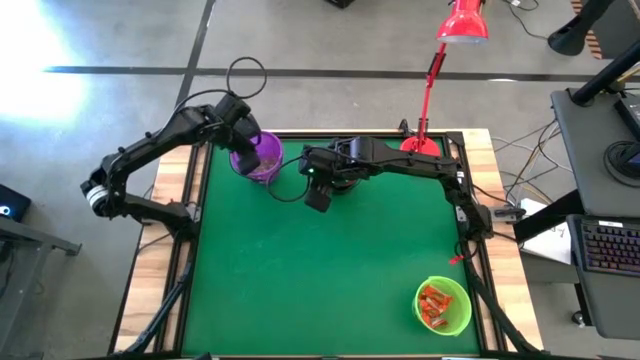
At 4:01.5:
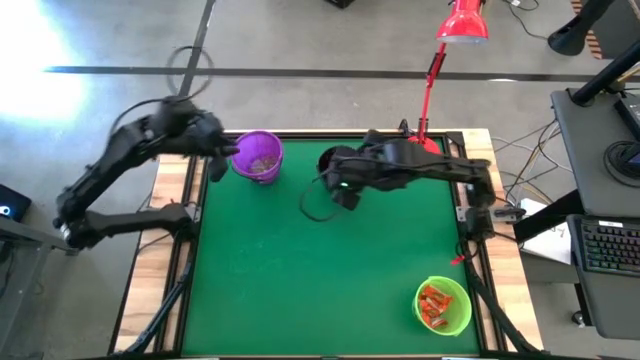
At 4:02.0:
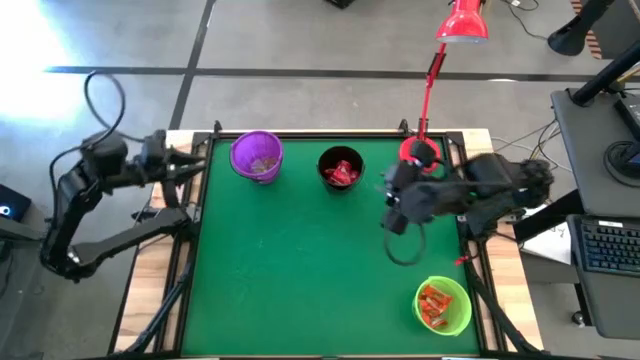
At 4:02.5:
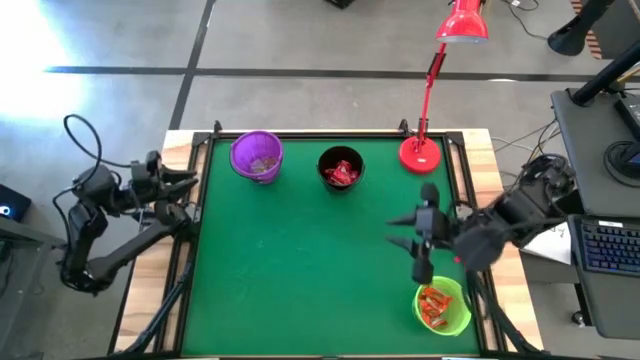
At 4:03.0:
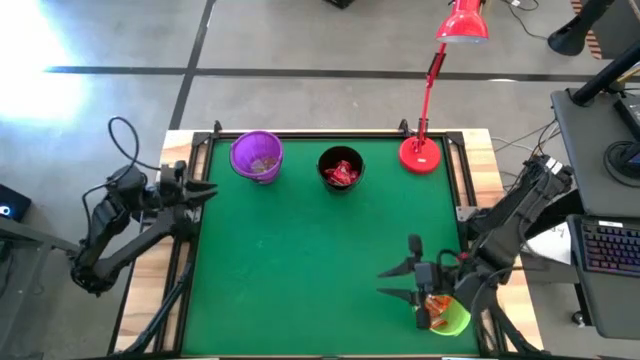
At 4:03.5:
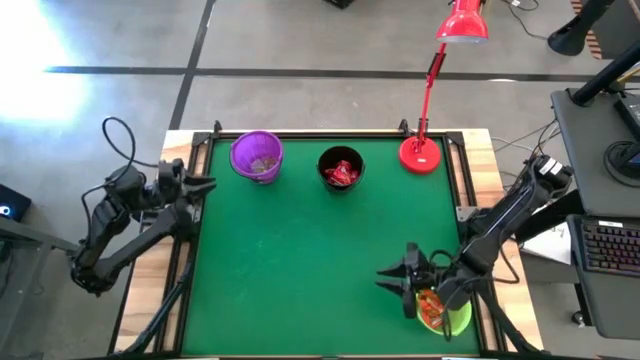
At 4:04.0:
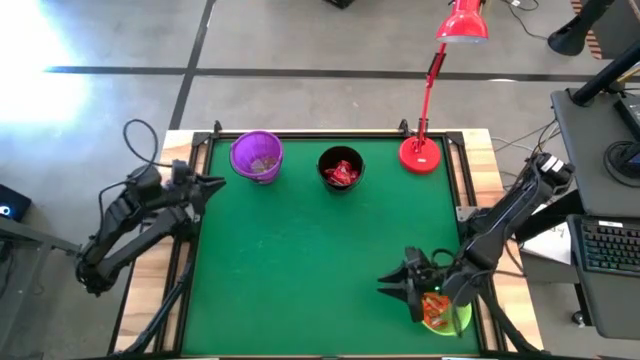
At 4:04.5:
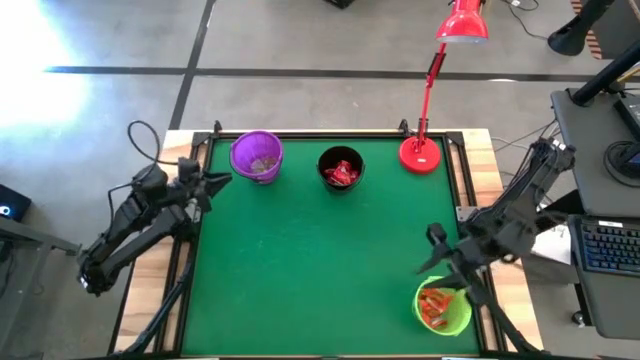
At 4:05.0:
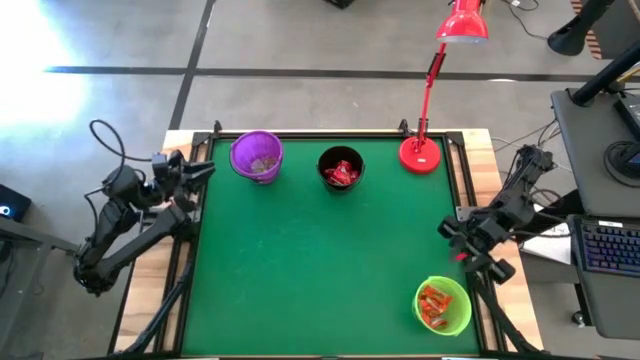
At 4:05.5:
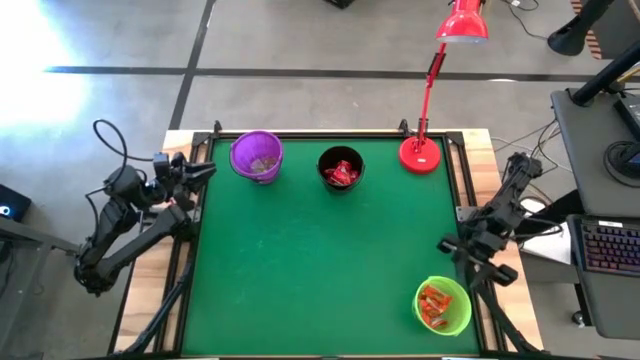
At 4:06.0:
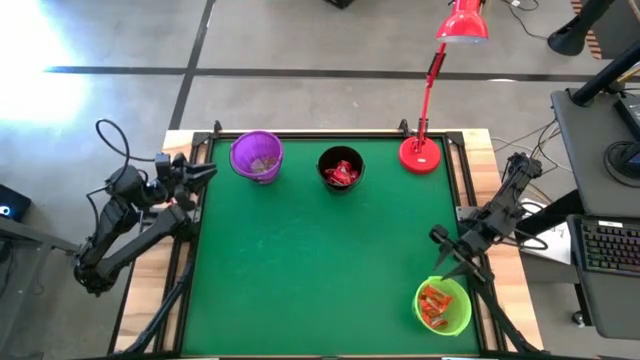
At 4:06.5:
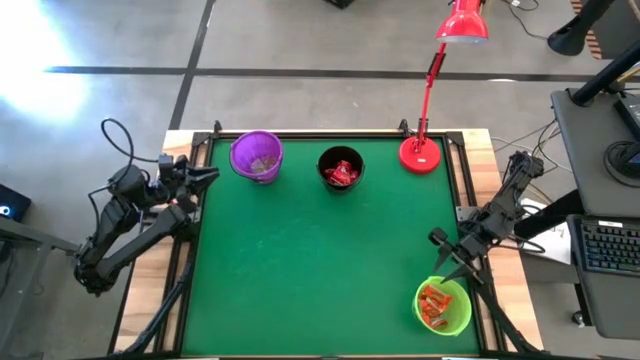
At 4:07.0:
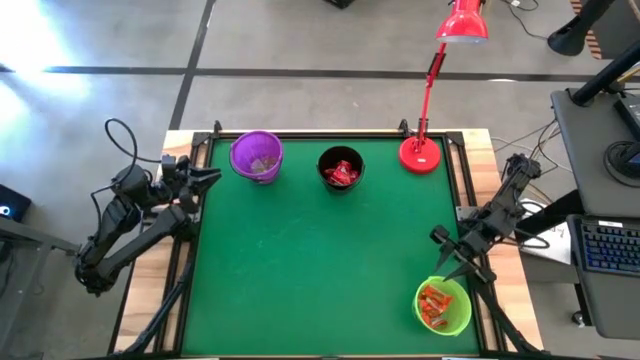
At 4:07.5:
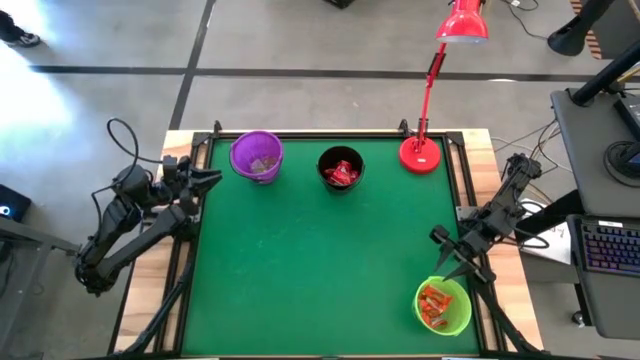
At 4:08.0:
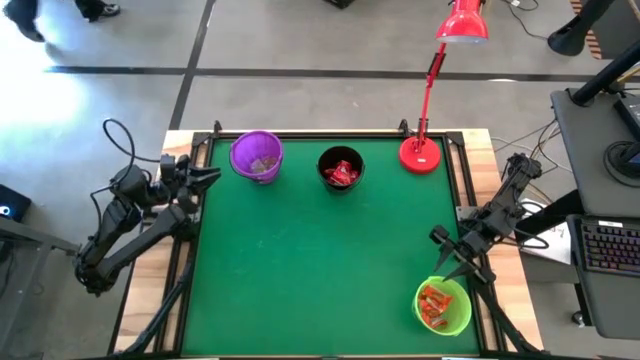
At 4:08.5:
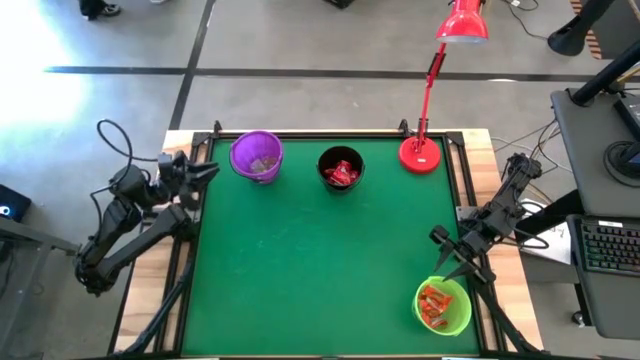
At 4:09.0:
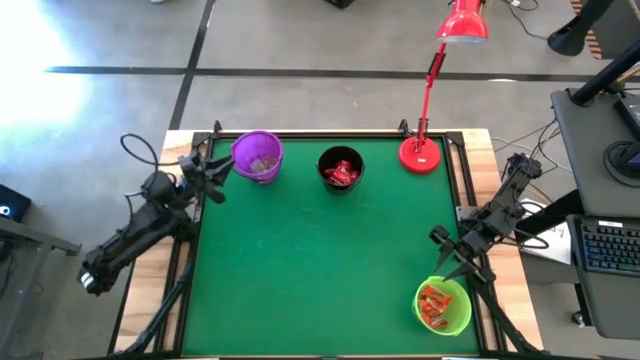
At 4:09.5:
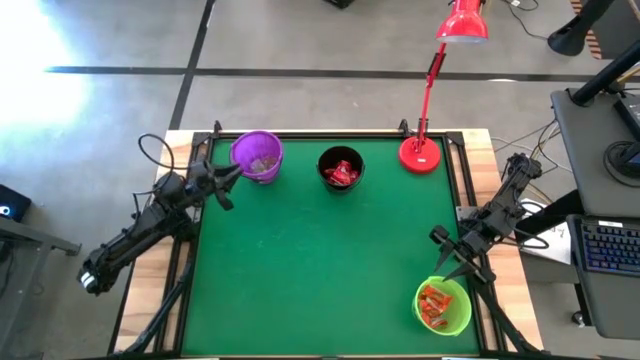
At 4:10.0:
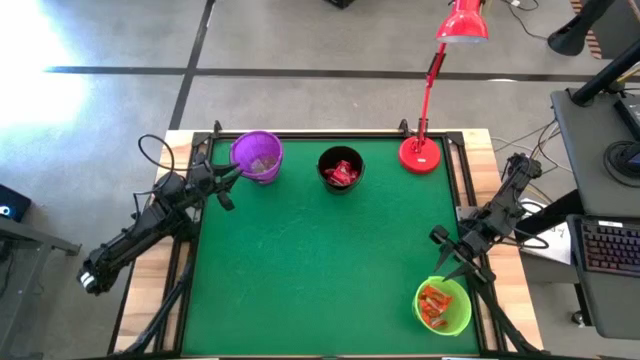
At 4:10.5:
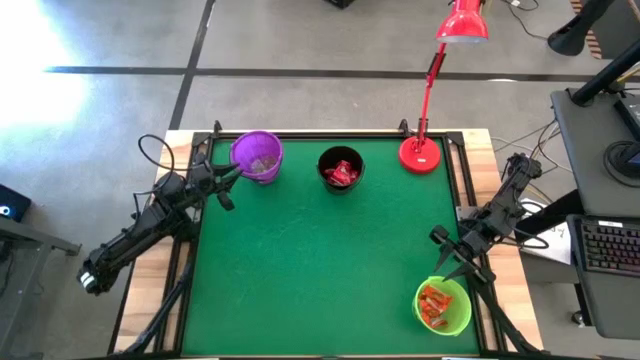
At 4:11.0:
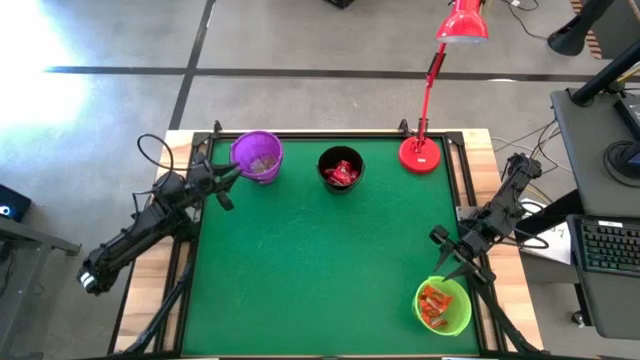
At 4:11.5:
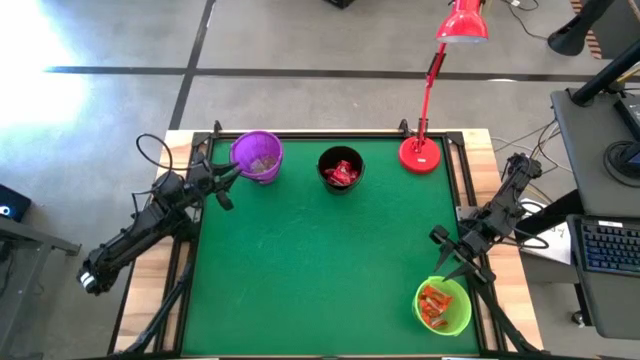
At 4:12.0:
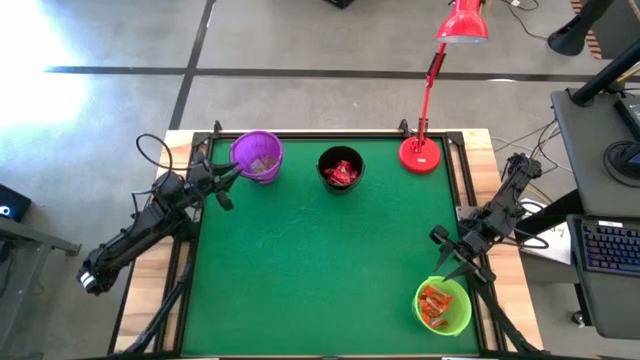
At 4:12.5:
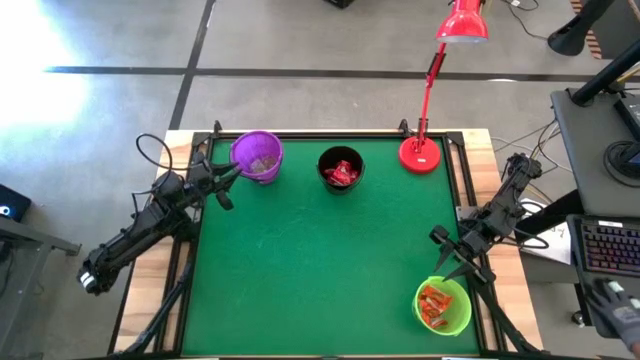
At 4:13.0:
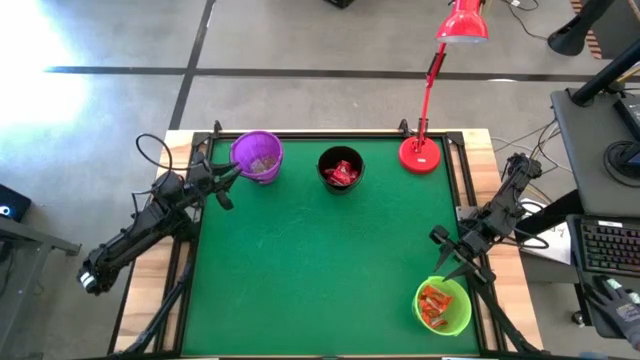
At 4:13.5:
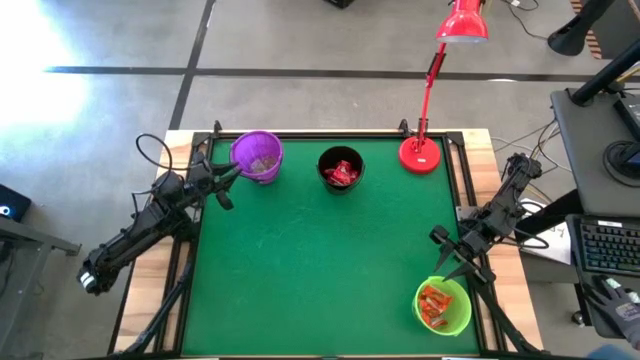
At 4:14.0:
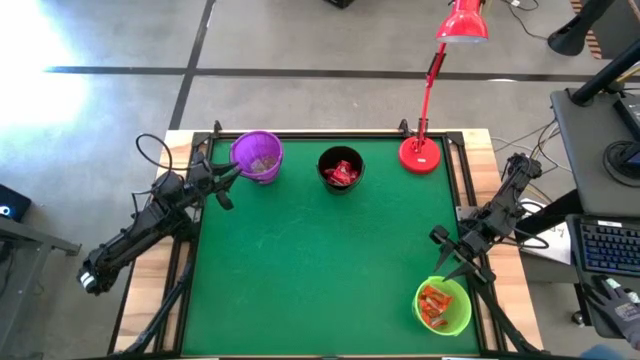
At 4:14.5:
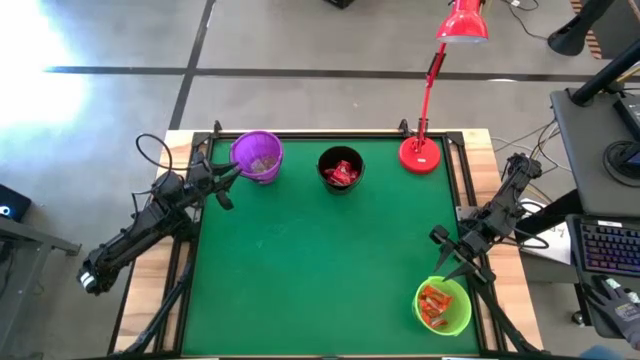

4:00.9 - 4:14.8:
Task: Sort candy
Return to Home Position

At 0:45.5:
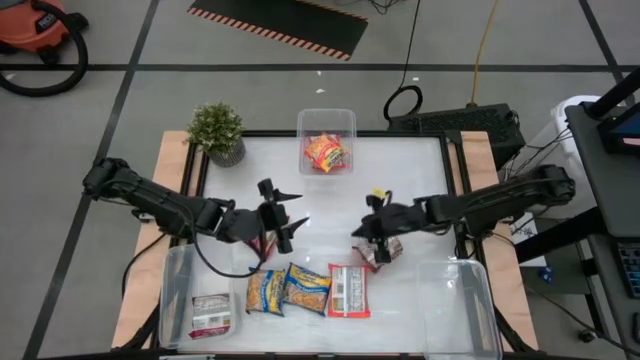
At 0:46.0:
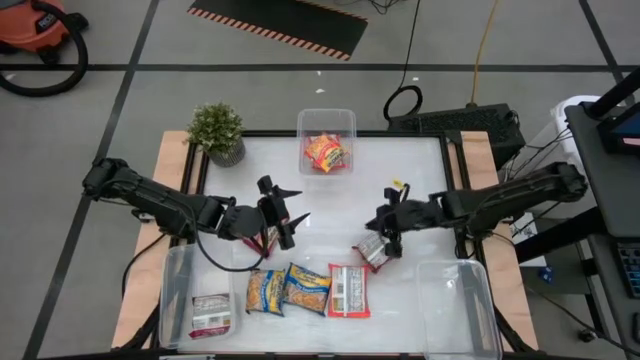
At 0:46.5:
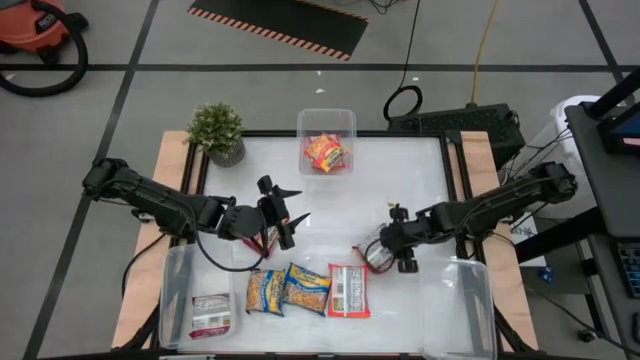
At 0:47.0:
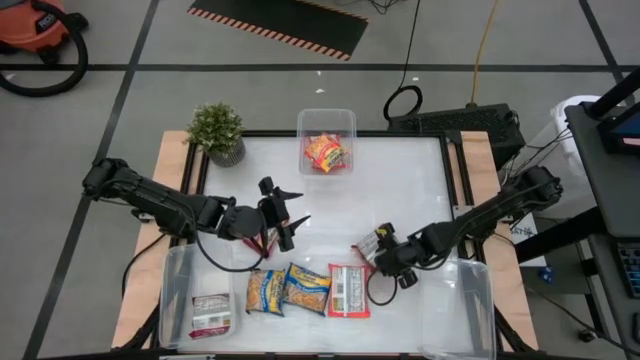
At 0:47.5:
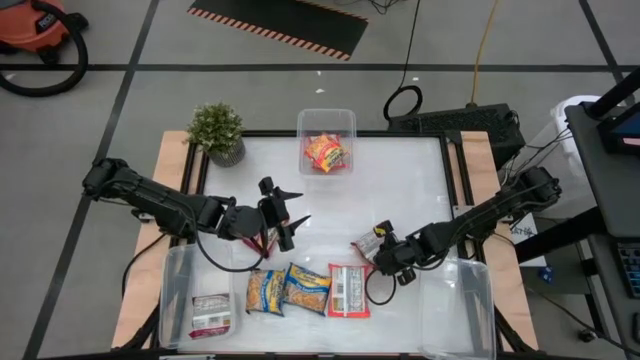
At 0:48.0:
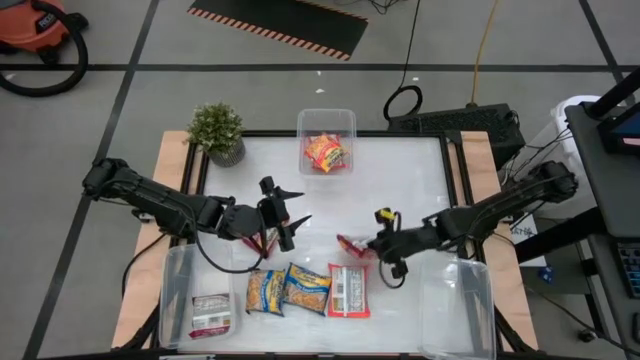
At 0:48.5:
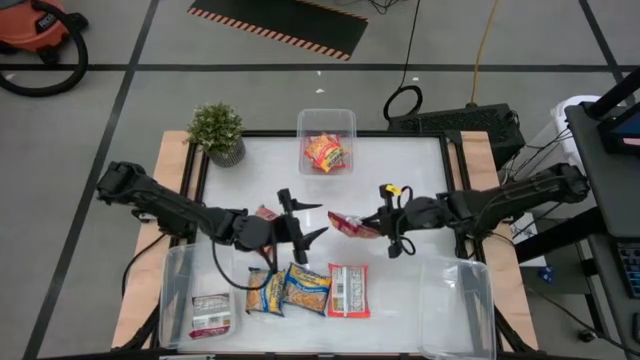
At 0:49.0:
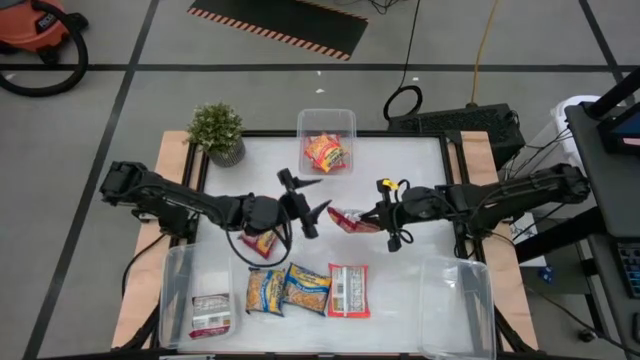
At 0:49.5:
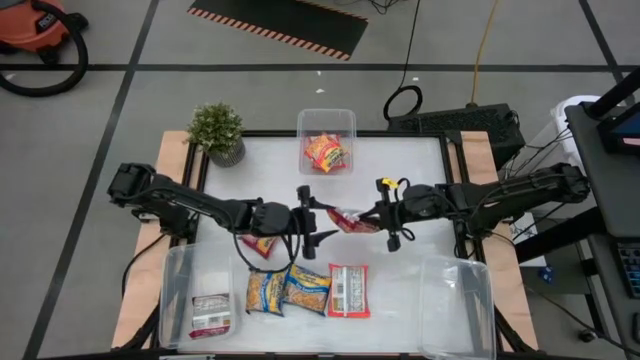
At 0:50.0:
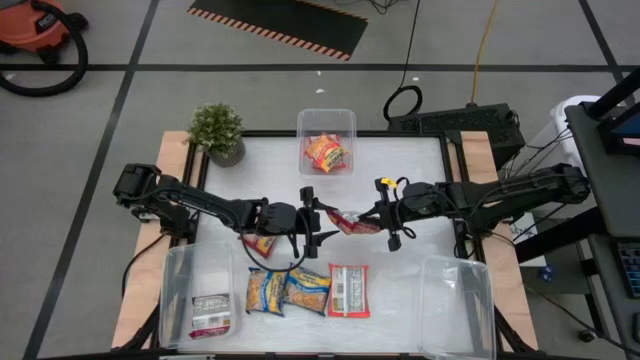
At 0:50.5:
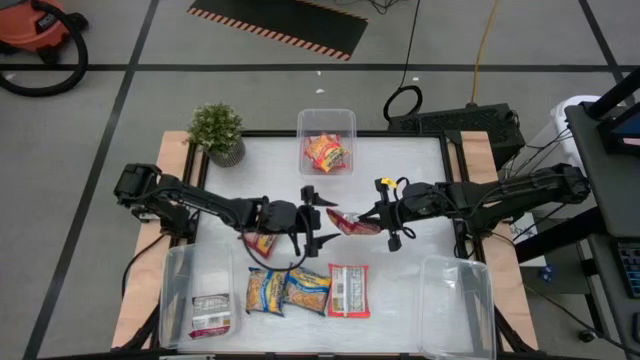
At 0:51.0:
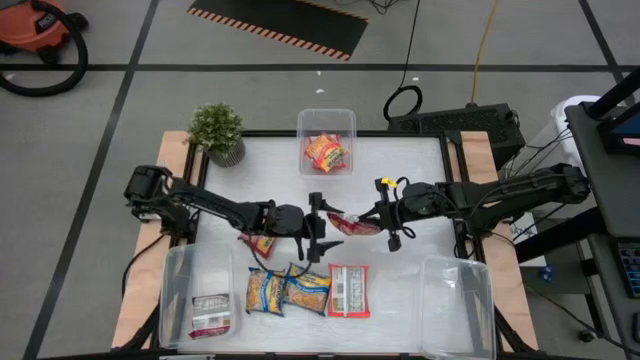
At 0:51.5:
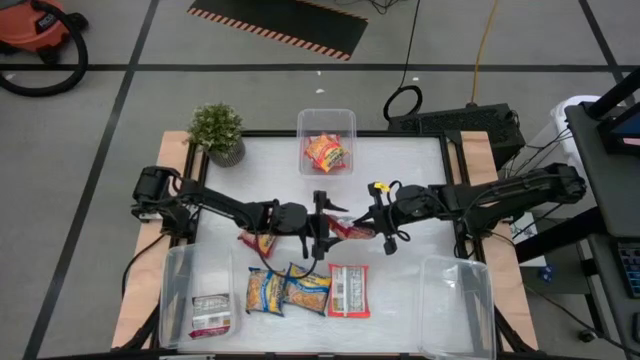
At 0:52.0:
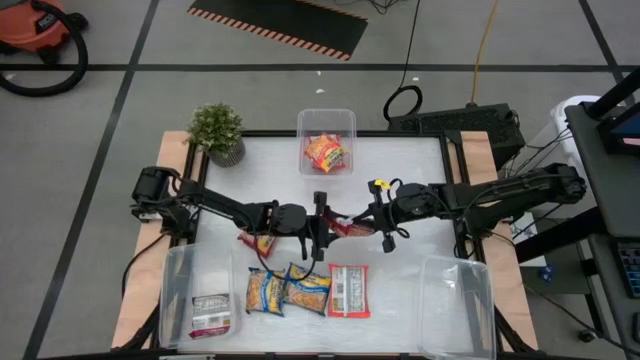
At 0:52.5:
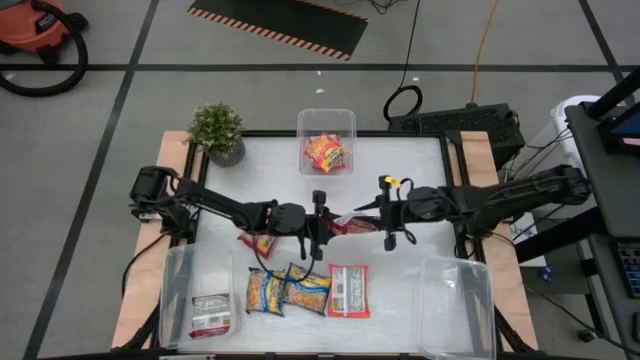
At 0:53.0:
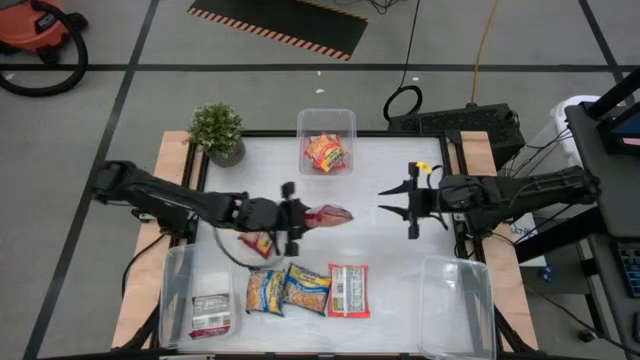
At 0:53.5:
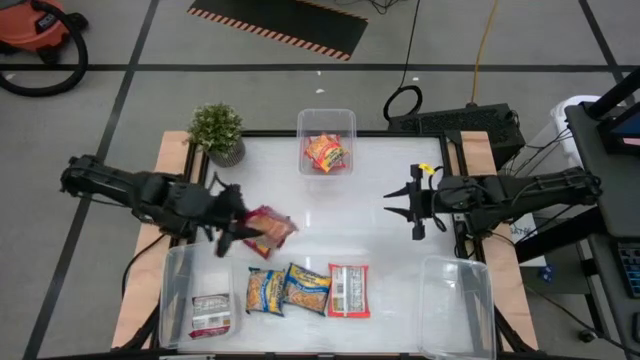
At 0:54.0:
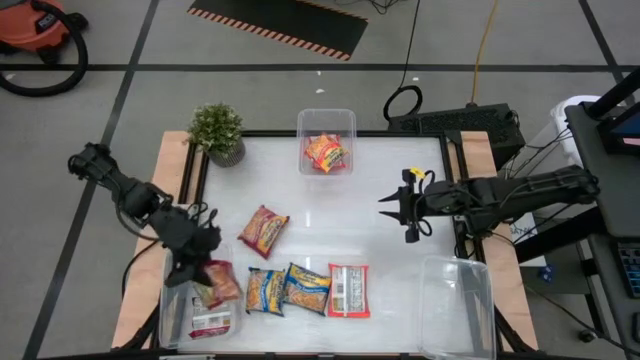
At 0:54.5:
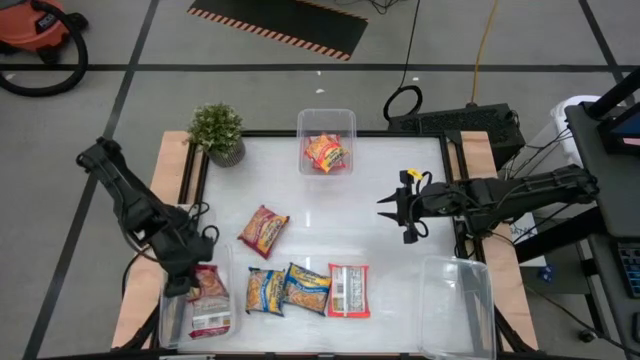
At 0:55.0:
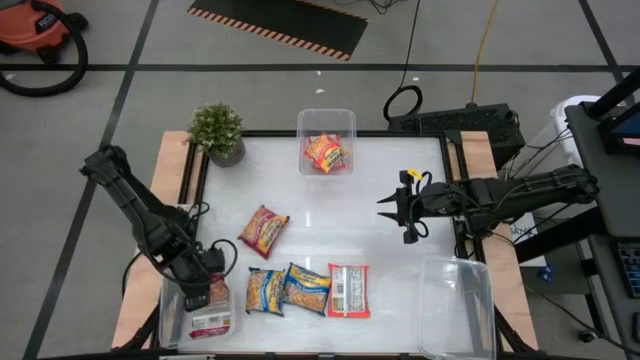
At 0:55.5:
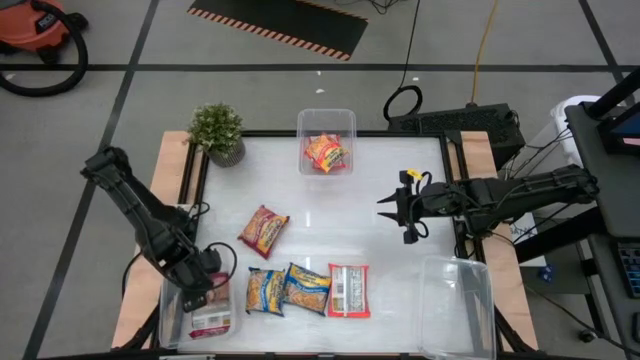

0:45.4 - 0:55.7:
Task: Sort Maruchan noodles
Put the right red noodle pack into the bottom left transparent bin
